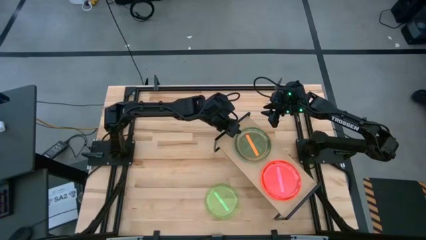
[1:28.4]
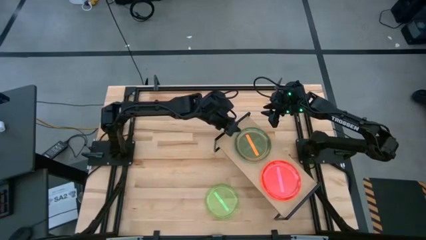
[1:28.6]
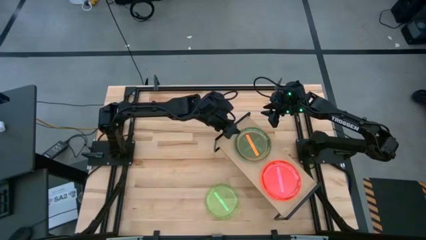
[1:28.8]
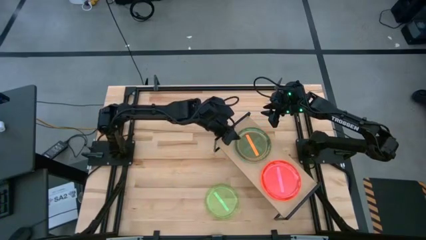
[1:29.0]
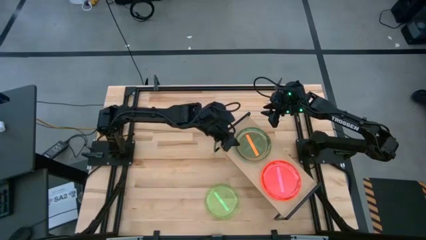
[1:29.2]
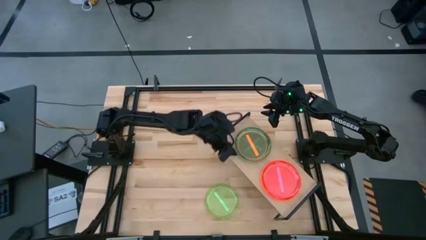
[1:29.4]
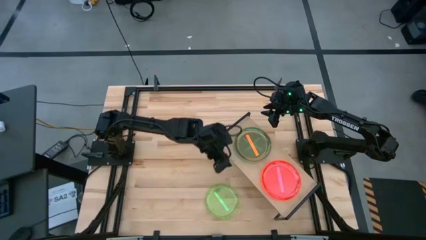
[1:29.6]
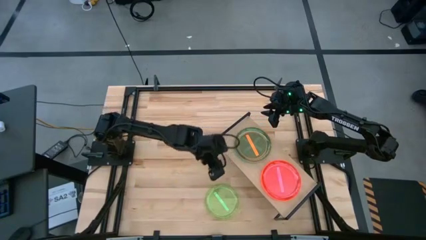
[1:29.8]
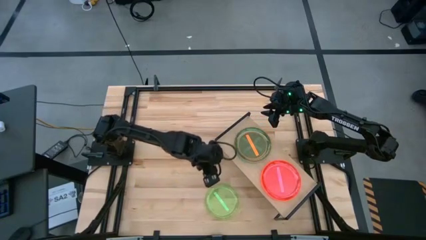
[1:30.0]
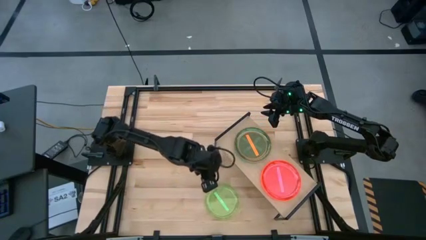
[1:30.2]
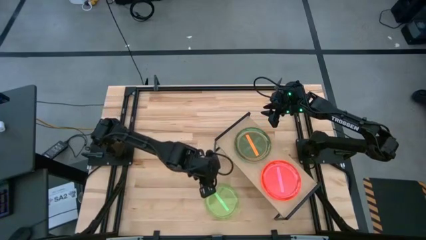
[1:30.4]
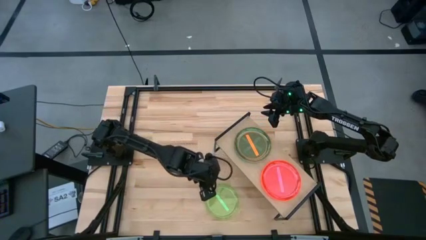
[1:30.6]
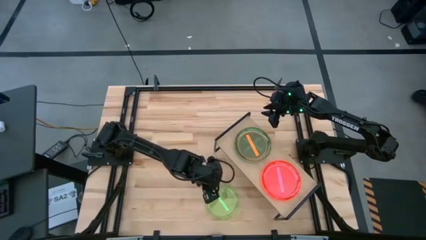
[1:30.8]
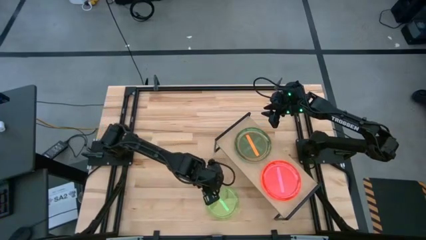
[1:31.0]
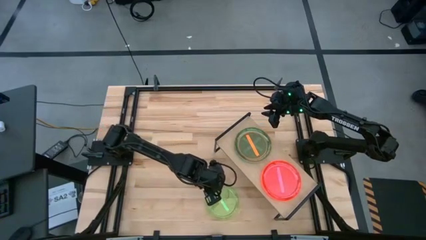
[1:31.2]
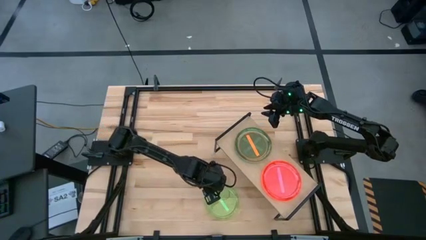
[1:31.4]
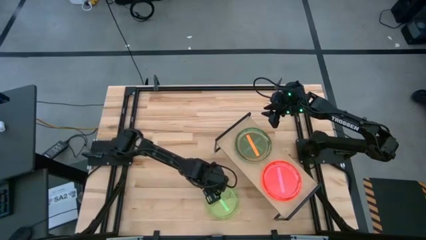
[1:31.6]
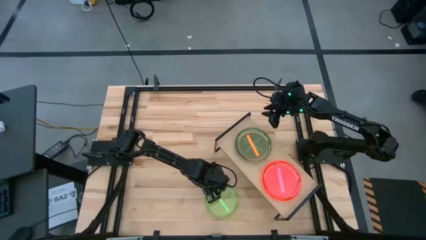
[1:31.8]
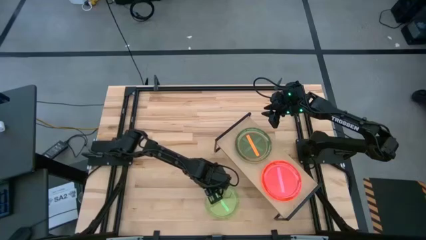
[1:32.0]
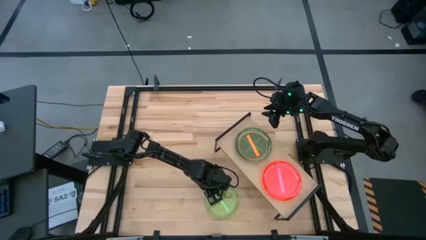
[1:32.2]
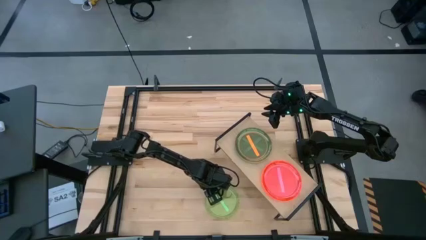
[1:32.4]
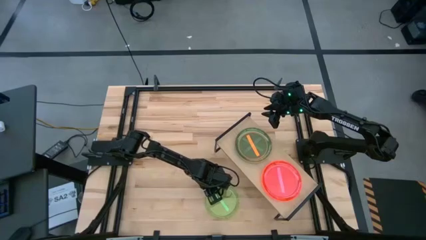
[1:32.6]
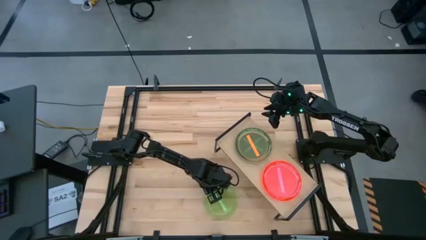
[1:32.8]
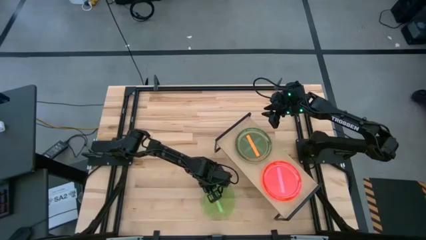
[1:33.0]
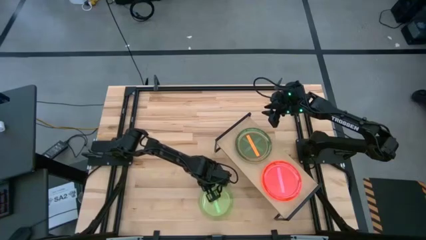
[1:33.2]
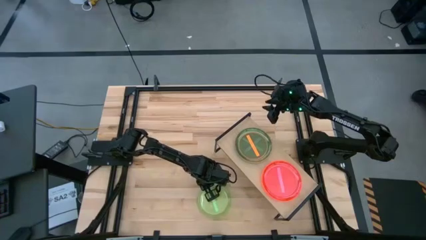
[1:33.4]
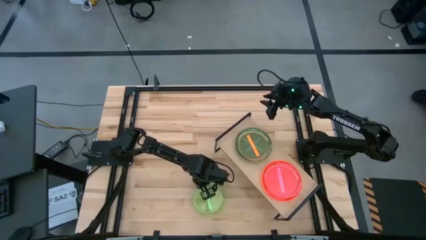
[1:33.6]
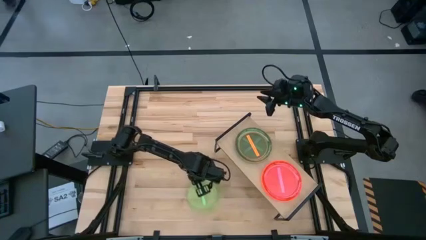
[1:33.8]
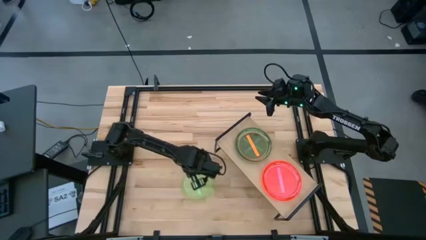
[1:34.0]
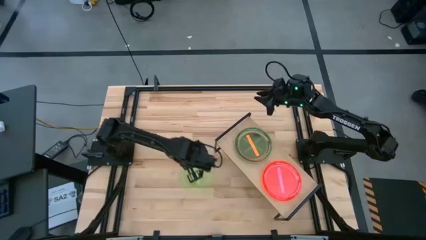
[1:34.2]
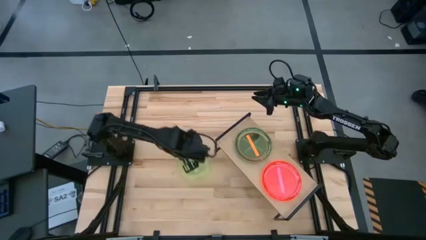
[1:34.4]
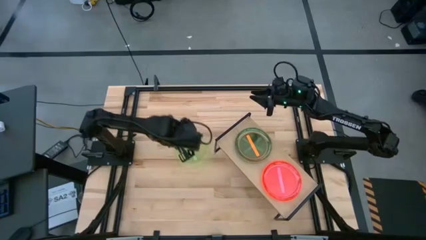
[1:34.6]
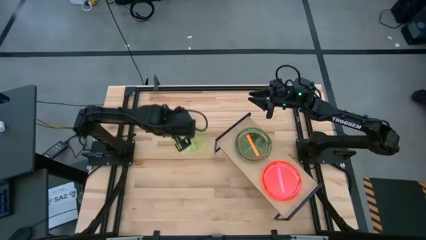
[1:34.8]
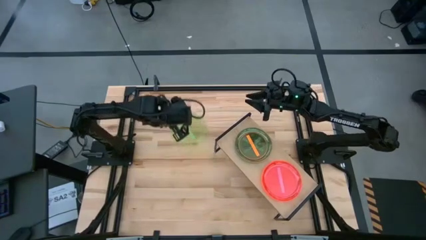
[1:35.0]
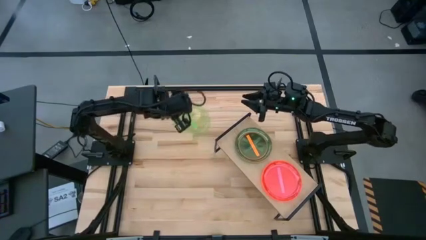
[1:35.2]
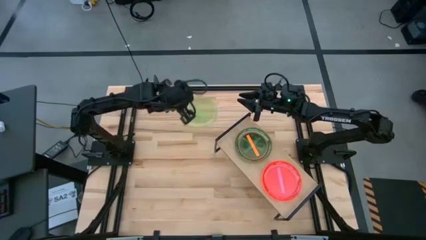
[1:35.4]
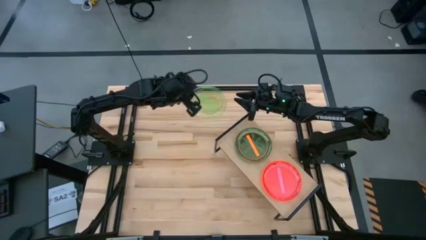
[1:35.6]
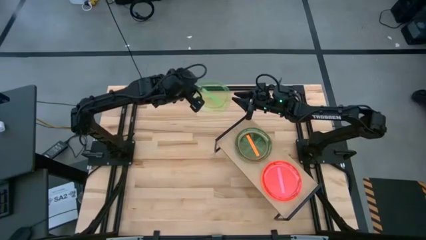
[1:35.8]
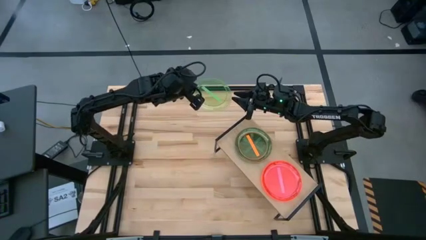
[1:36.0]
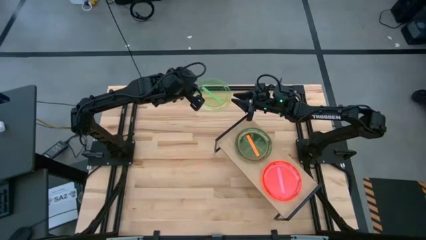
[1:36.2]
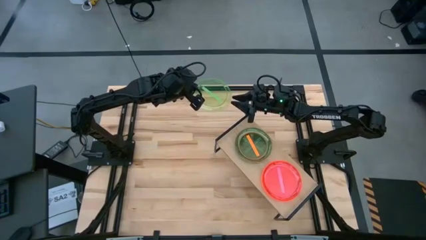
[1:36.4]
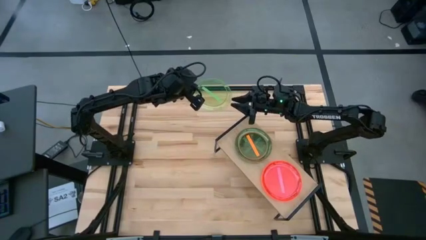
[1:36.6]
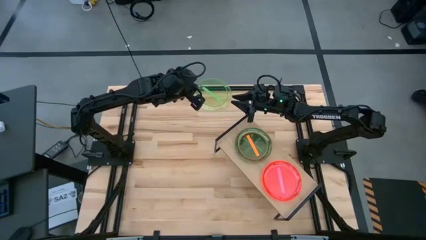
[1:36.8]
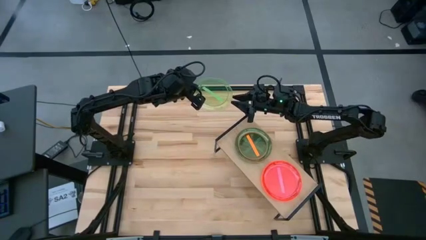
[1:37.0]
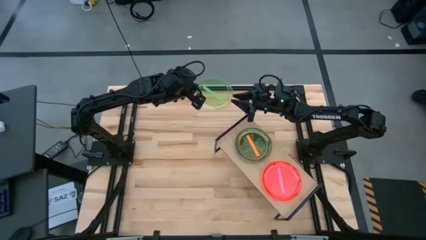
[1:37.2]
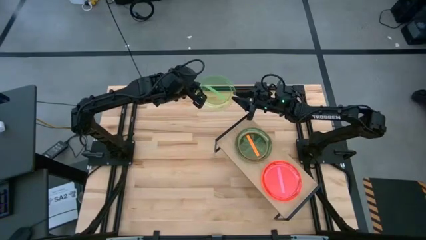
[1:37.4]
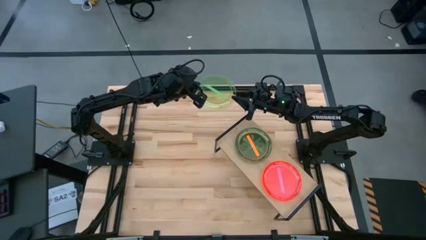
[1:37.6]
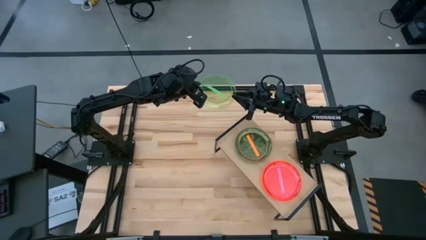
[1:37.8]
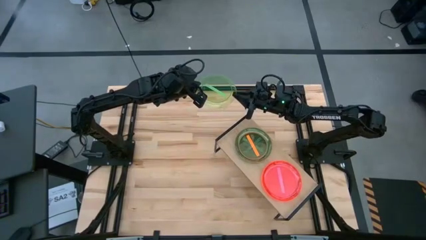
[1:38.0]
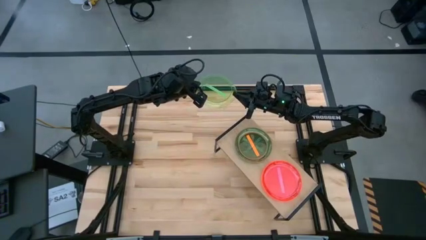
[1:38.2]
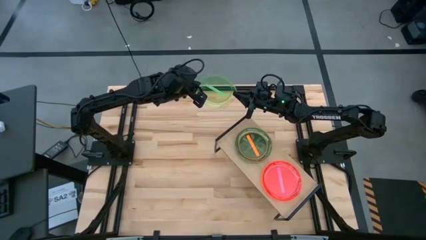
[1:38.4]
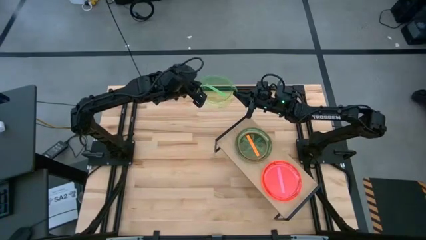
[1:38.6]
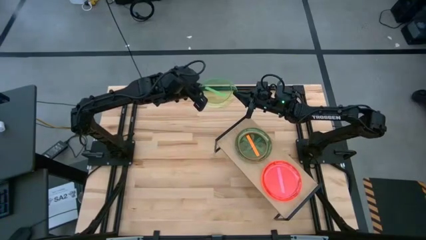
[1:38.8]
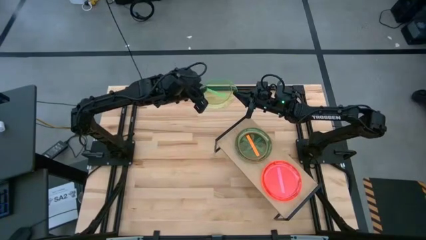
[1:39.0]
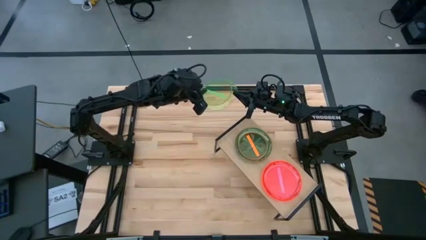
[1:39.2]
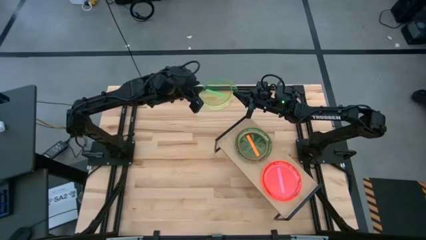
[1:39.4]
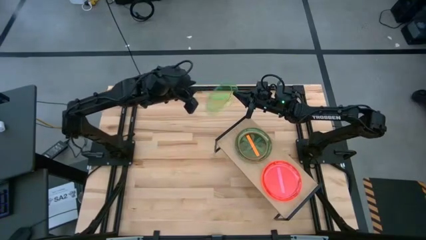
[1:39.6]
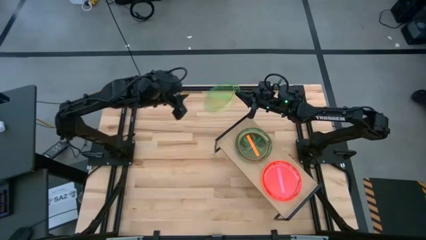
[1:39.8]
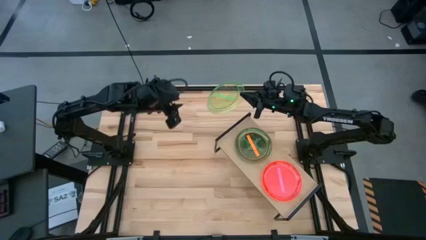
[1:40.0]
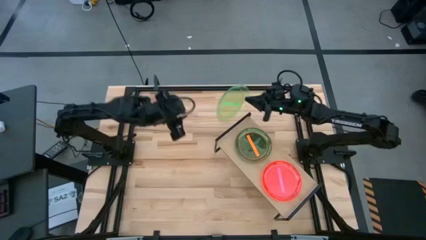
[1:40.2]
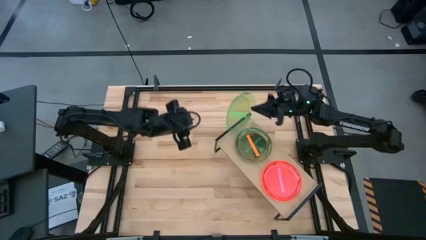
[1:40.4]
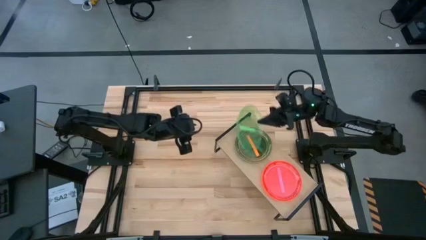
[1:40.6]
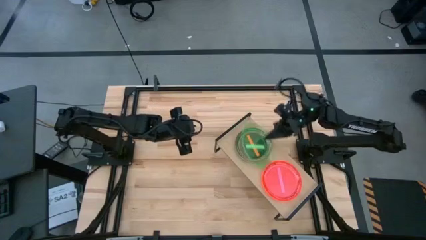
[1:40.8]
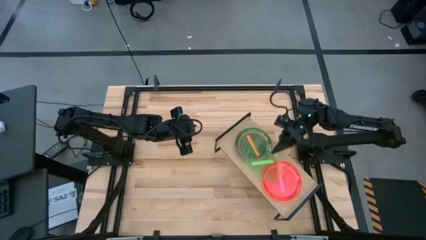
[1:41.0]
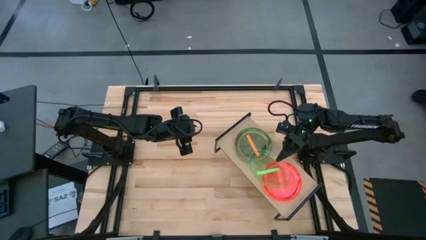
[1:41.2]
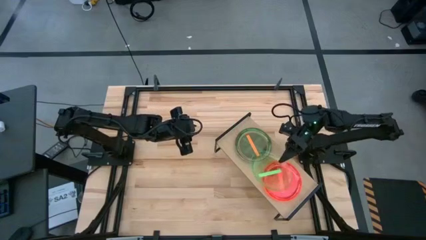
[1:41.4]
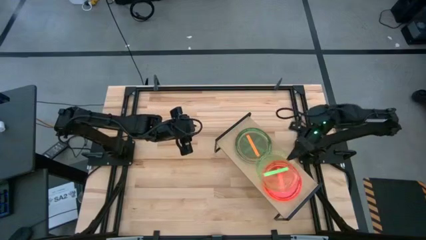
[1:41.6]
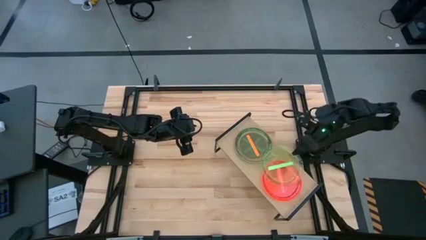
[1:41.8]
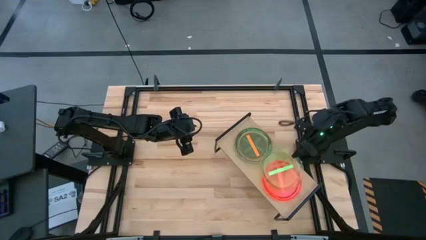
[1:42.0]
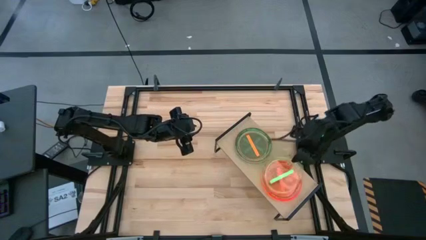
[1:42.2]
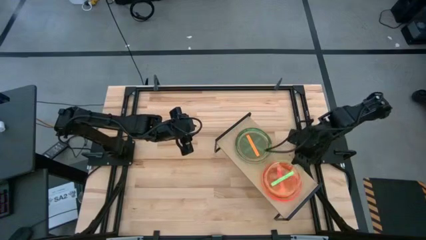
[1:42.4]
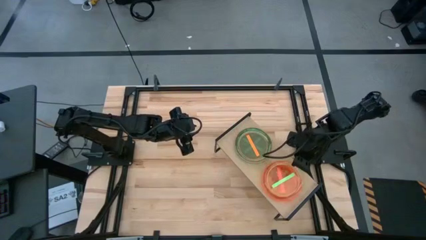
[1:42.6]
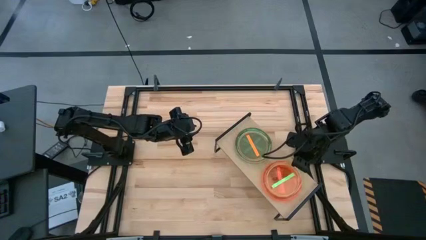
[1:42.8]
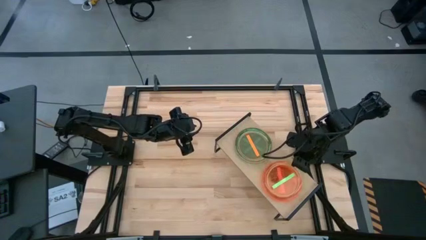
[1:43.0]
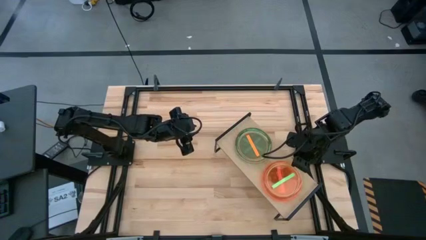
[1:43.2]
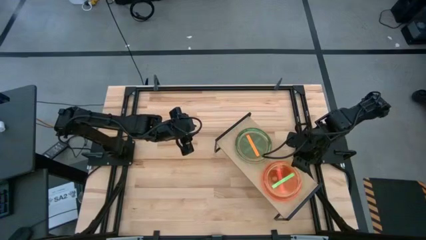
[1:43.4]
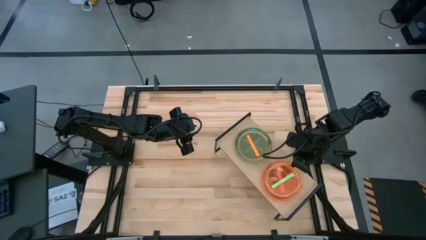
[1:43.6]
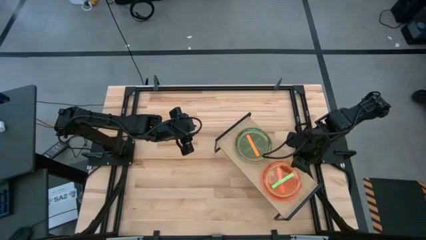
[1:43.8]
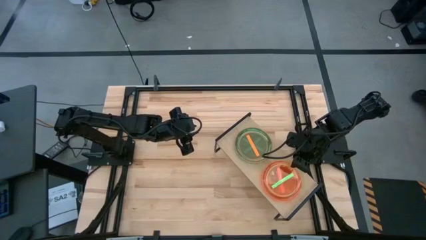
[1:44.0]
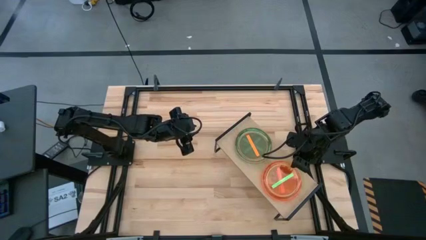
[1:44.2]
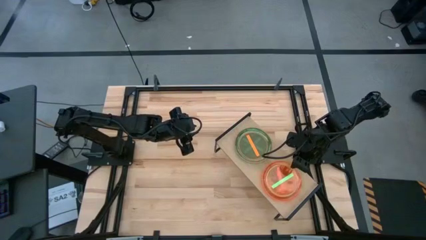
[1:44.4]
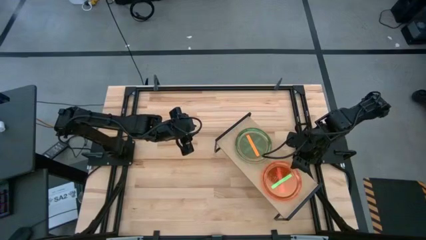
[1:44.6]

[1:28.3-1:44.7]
Task: Place and stack plates onto a shelf
Stack the green plate on top of the pink plate on the shelf
